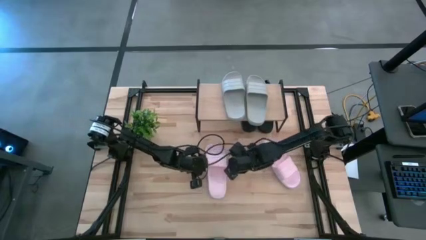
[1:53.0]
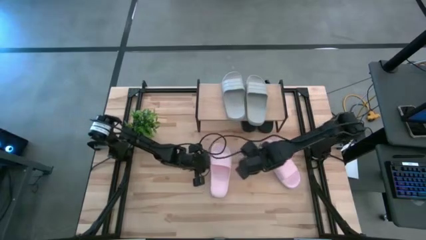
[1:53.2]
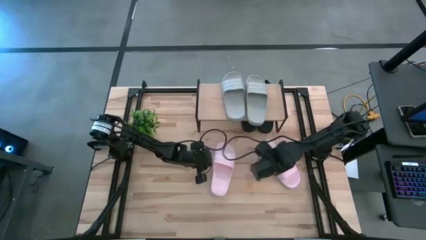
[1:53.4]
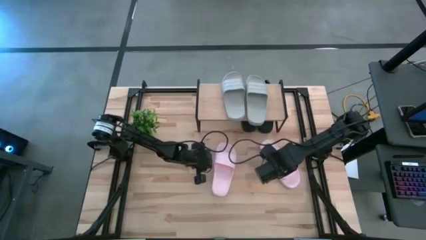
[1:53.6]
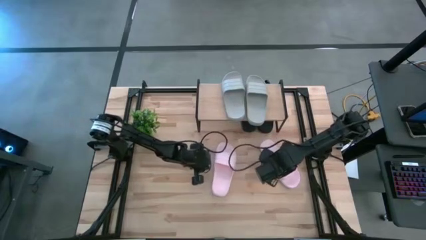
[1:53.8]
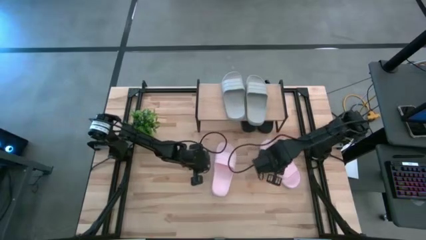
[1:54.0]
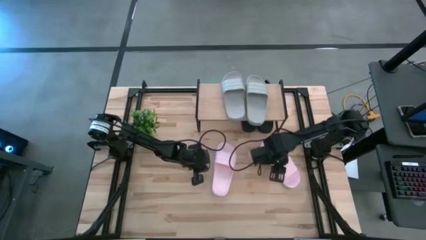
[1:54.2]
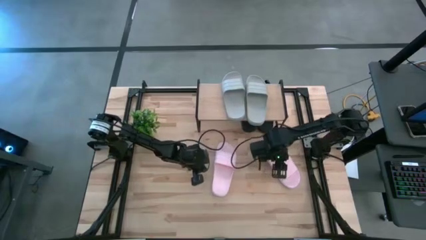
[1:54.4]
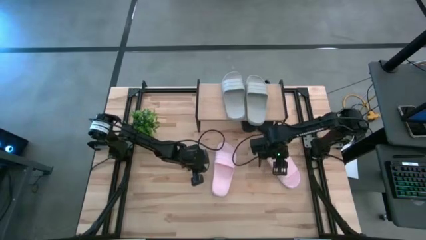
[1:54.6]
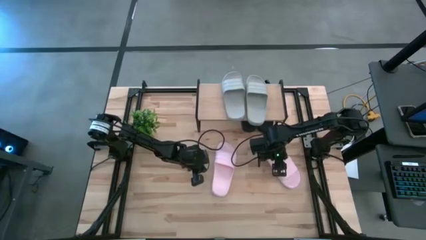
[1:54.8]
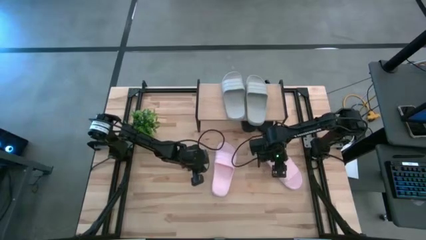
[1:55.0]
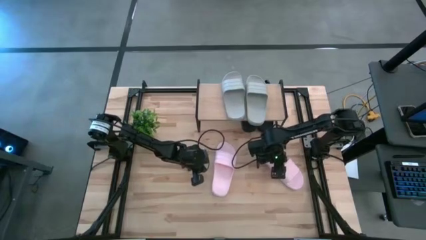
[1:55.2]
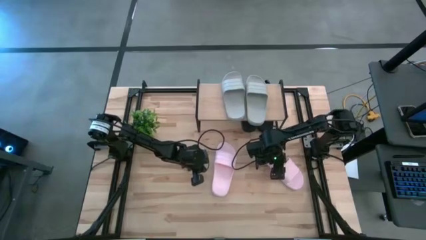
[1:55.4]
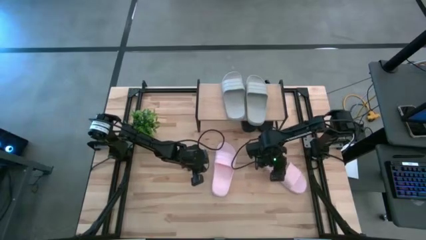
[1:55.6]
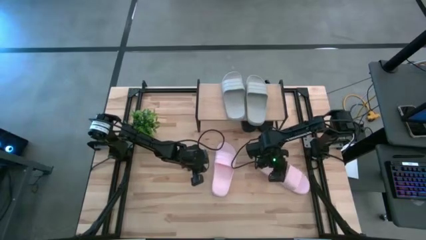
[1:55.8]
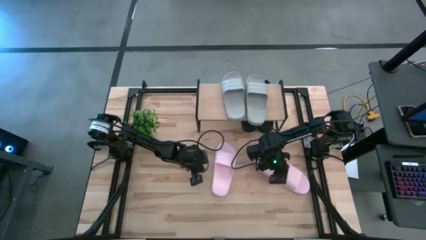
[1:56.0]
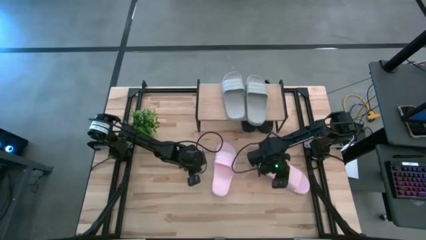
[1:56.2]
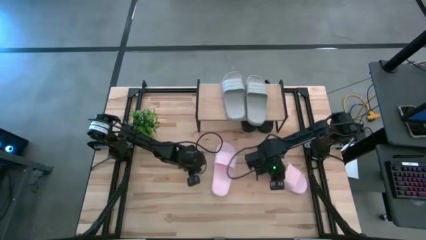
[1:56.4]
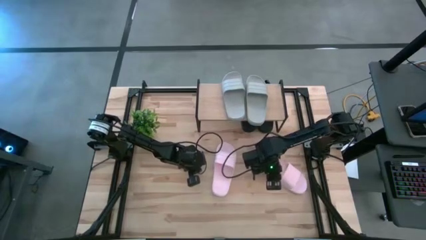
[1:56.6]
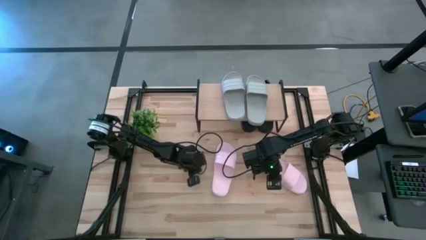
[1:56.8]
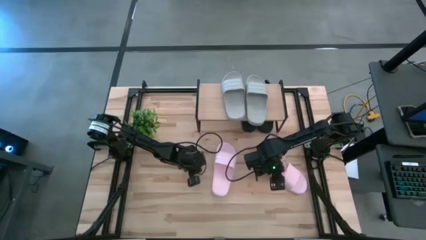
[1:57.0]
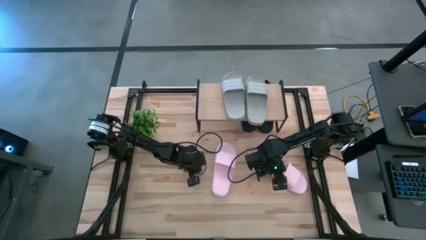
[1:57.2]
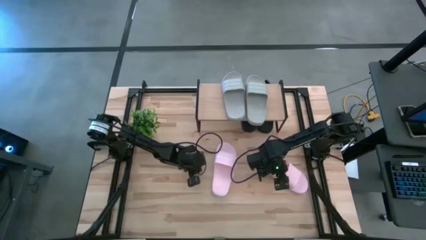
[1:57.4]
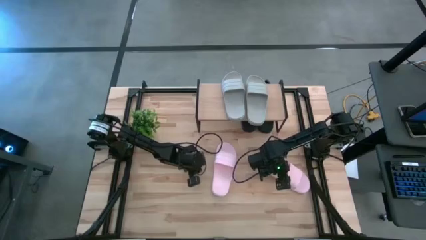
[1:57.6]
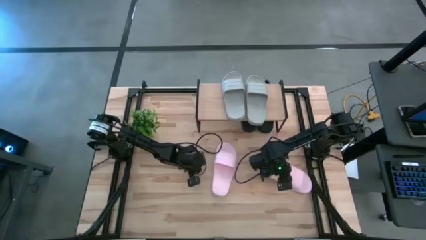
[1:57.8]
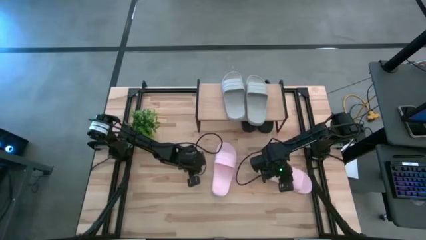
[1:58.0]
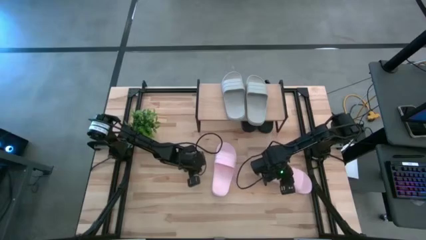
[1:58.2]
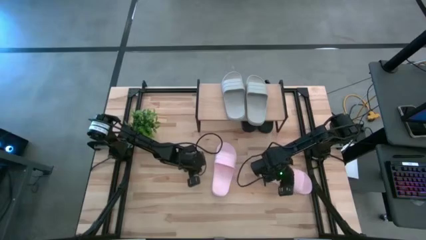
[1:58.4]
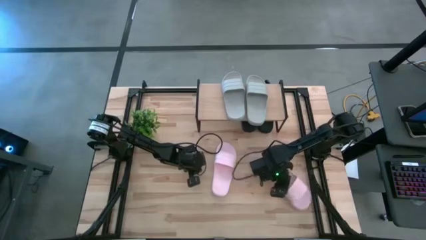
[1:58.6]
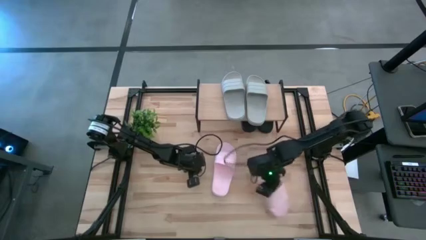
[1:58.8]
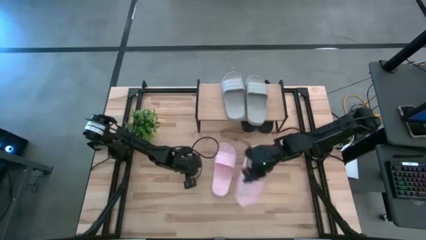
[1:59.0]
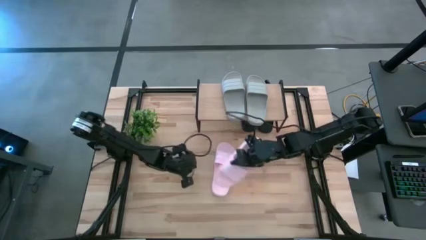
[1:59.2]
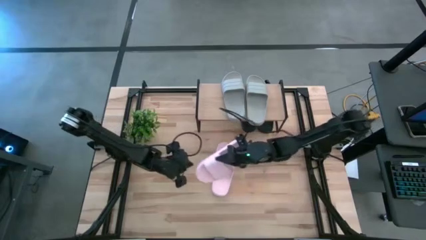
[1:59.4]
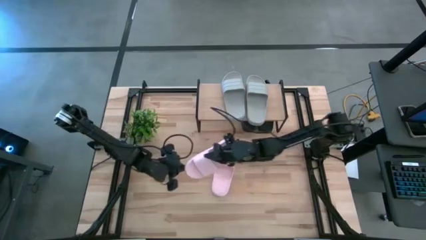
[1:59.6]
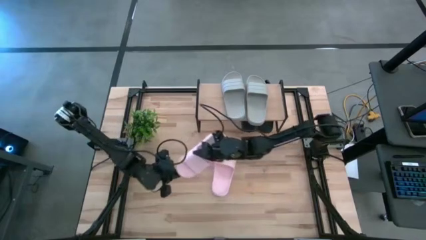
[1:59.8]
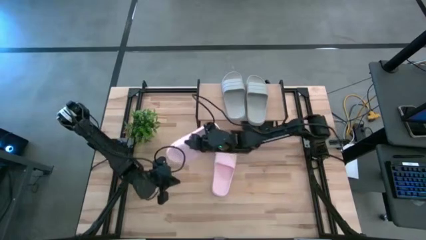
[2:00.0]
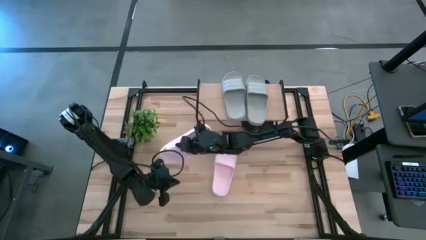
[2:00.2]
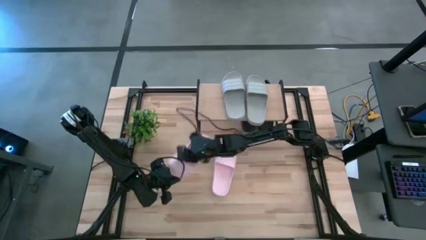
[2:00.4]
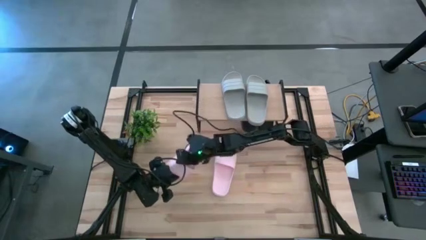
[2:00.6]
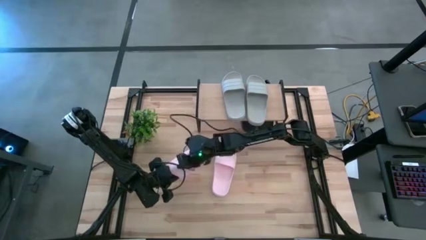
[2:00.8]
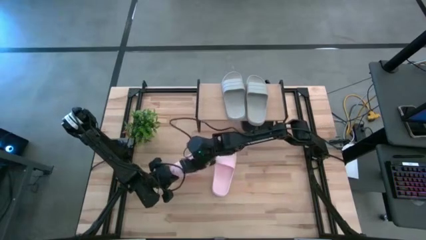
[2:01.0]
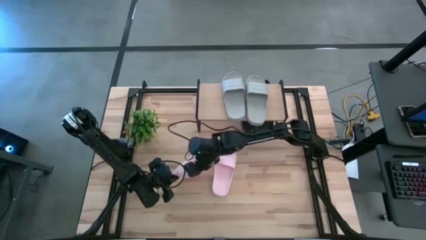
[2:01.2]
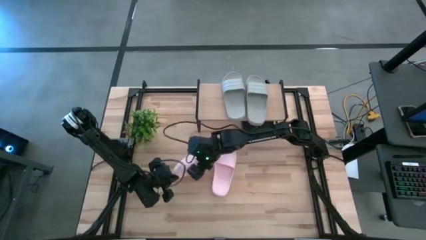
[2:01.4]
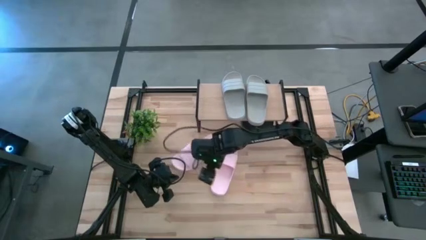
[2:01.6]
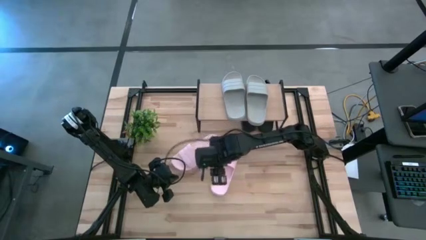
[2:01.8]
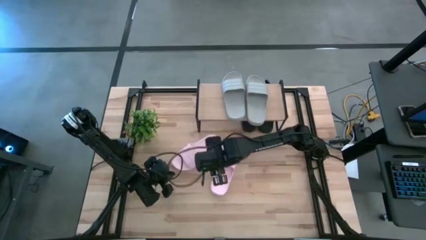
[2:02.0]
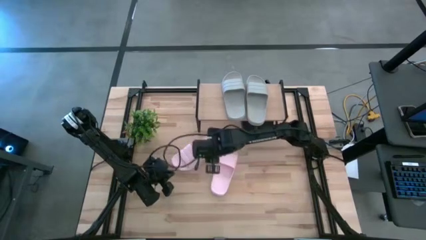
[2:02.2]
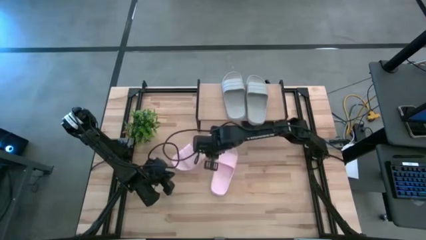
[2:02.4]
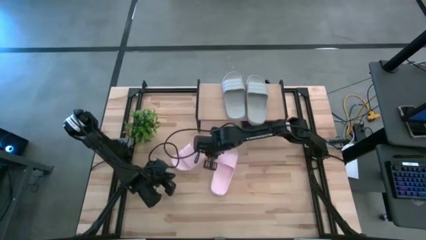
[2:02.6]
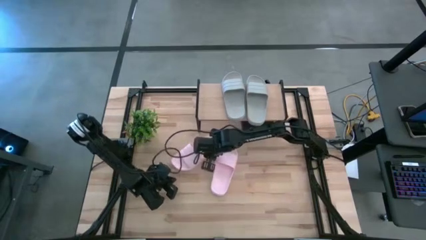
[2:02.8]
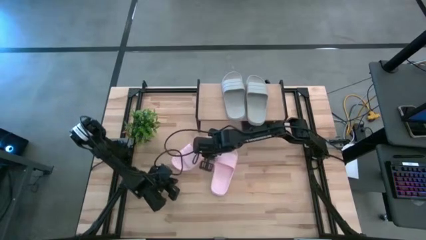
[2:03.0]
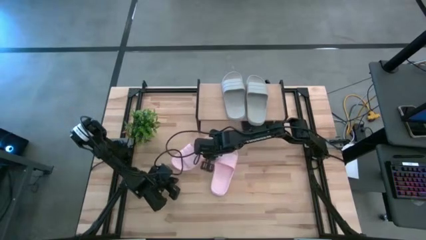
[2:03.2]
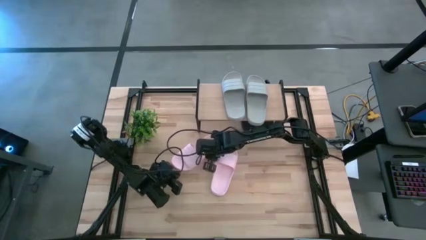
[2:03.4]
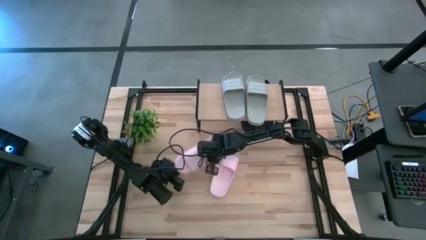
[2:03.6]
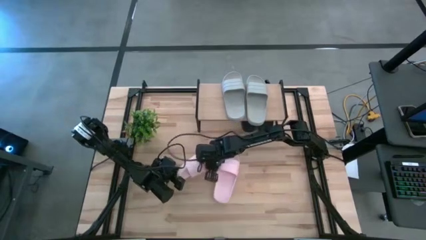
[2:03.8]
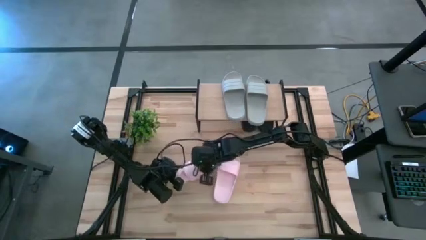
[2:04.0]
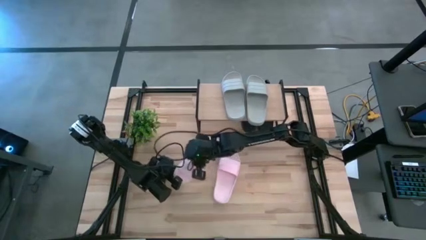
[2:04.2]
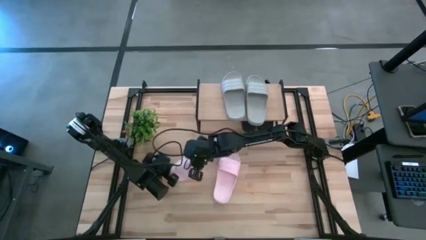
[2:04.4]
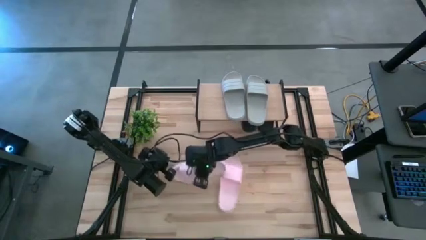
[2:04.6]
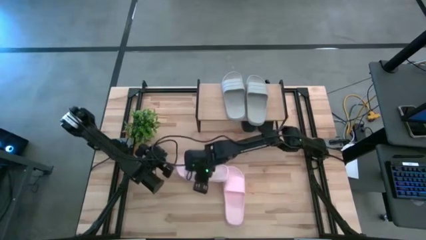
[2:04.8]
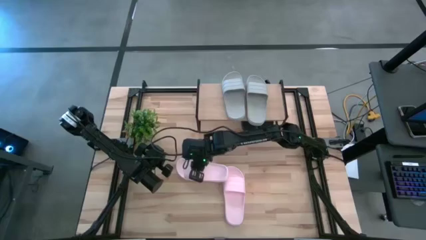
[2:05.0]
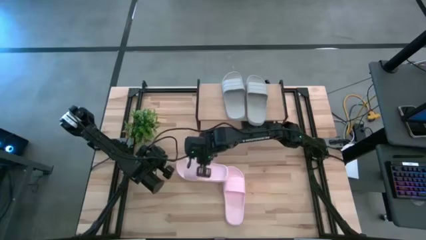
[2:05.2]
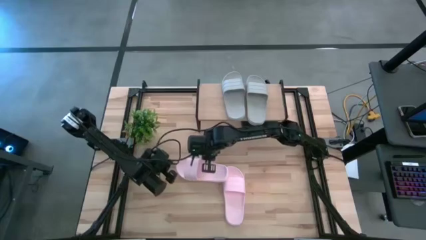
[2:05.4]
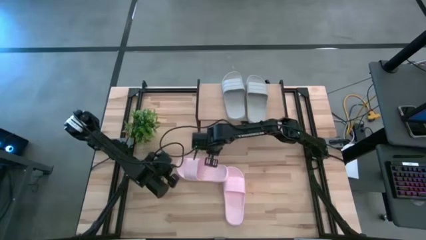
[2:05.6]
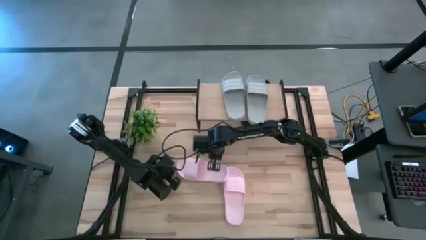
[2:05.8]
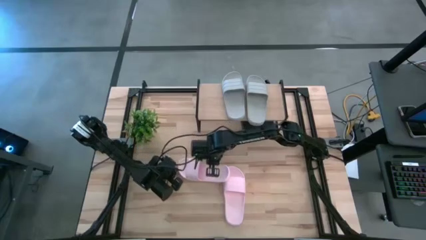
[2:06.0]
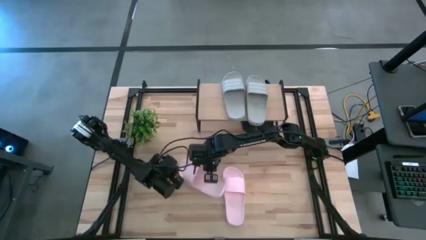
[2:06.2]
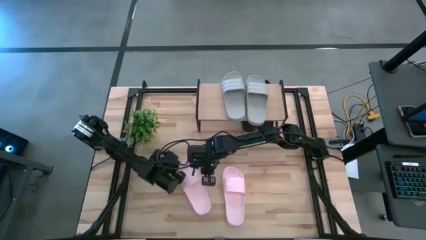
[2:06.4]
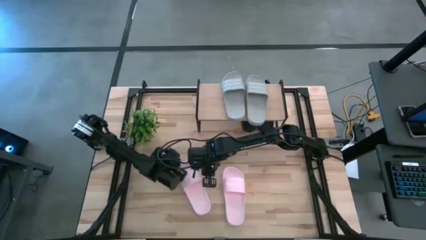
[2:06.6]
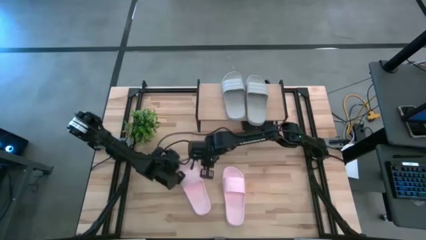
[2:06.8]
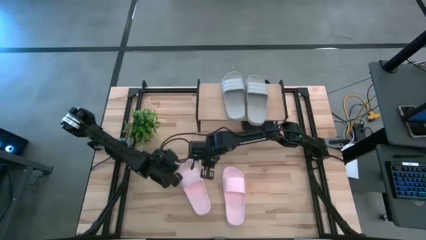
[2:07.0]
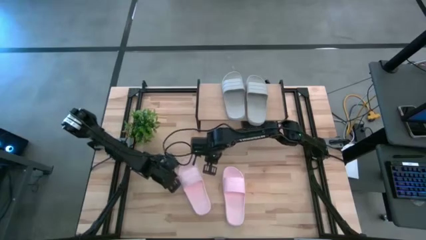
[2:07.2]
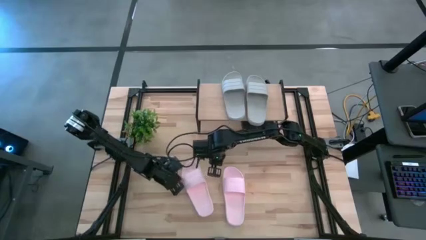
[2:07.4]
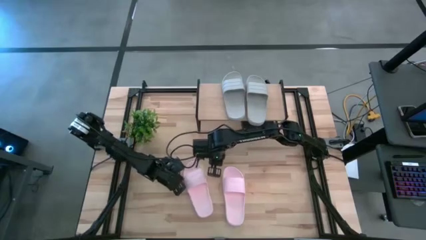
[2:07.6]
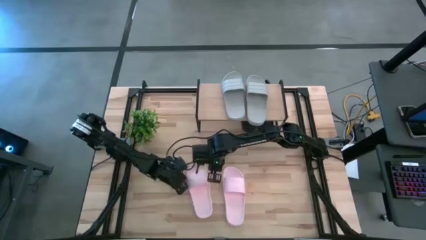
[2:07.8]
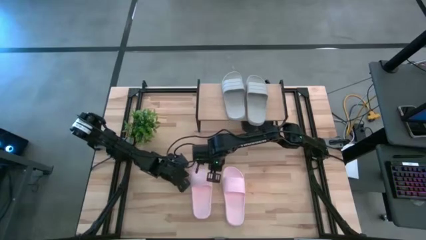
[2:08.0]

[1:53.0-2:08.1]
Task: Pick and place slides into the shelf
Move the right pink slipper to the left side of the other pink slipper
